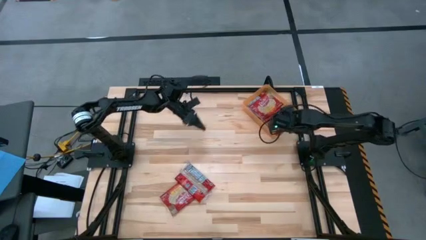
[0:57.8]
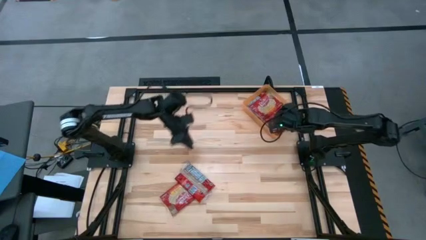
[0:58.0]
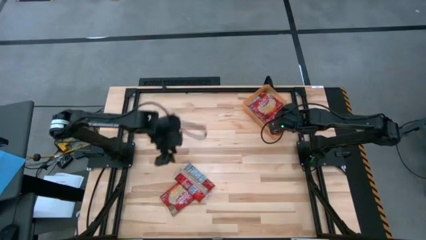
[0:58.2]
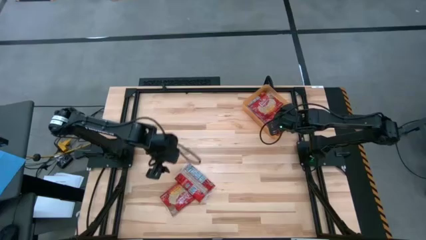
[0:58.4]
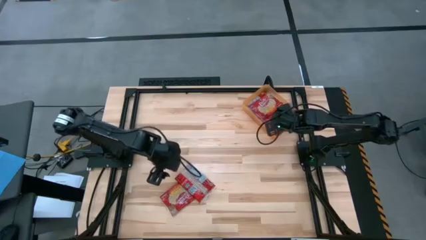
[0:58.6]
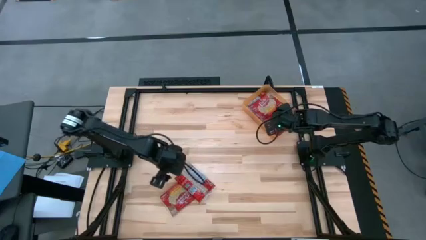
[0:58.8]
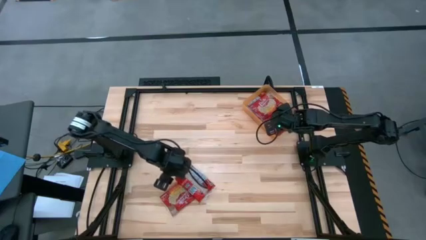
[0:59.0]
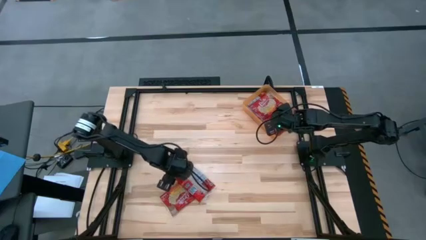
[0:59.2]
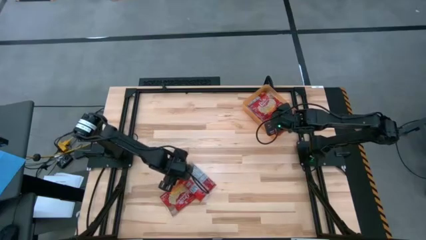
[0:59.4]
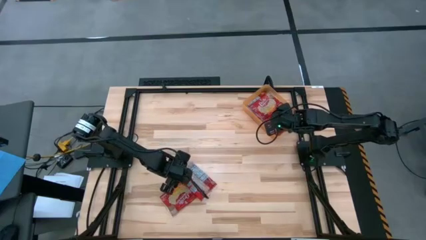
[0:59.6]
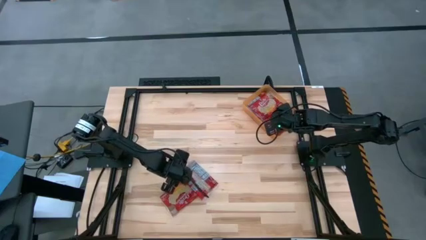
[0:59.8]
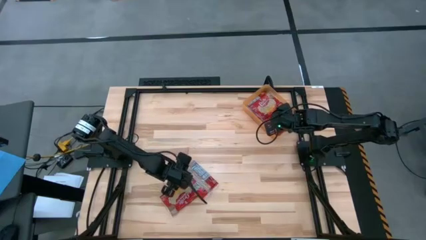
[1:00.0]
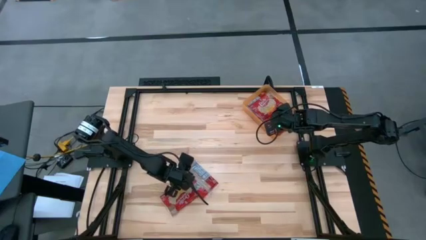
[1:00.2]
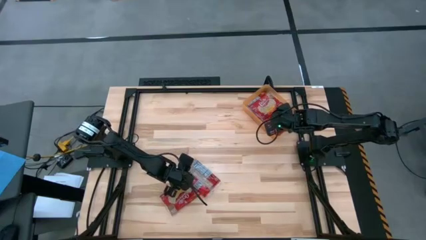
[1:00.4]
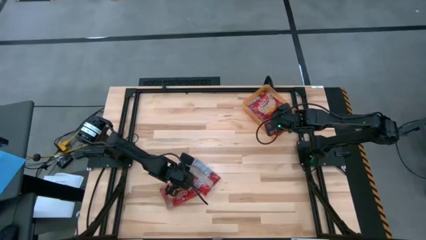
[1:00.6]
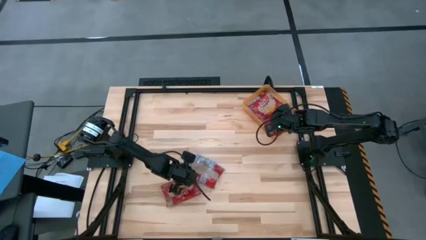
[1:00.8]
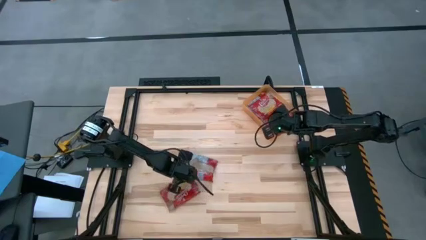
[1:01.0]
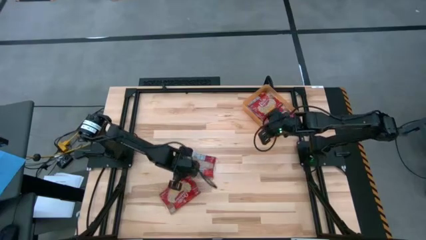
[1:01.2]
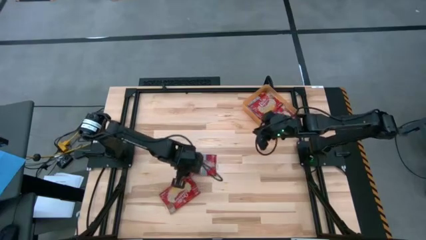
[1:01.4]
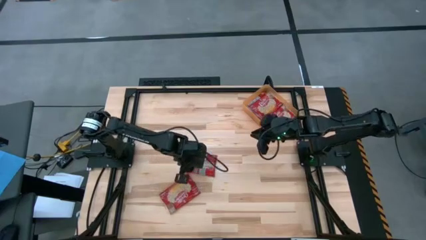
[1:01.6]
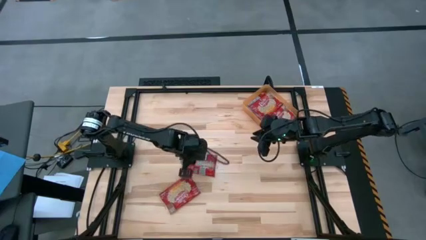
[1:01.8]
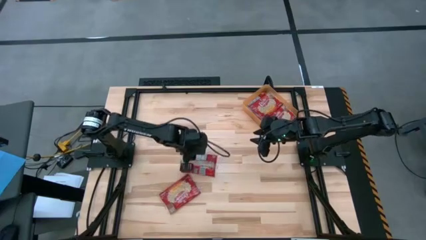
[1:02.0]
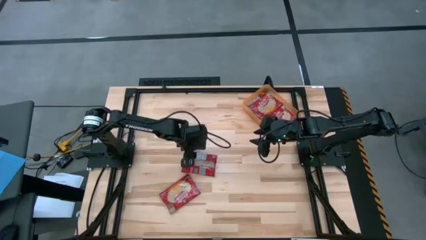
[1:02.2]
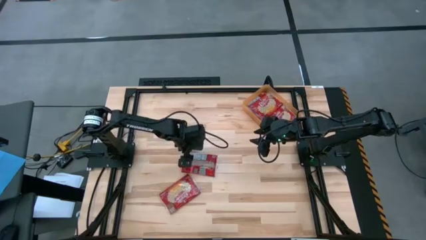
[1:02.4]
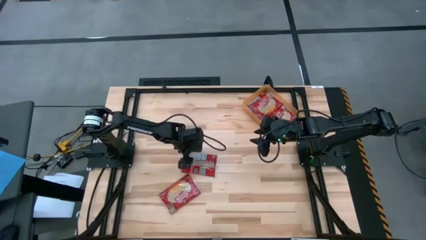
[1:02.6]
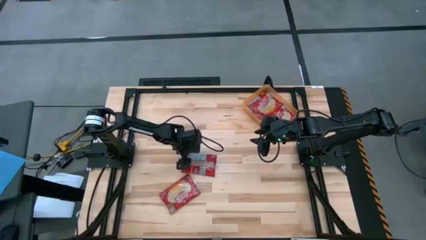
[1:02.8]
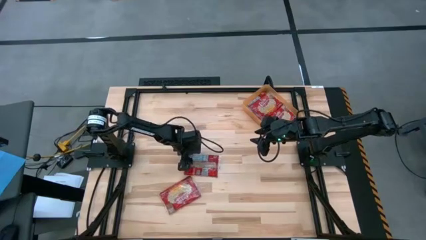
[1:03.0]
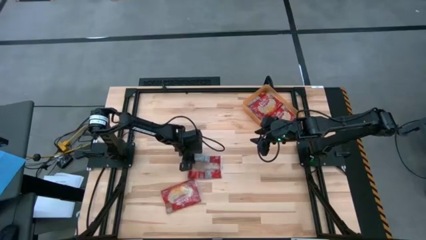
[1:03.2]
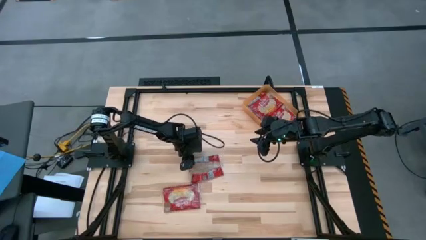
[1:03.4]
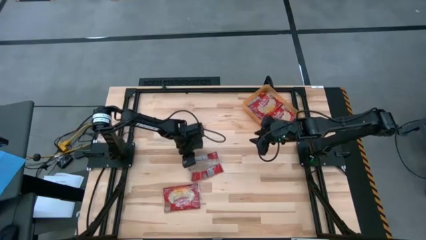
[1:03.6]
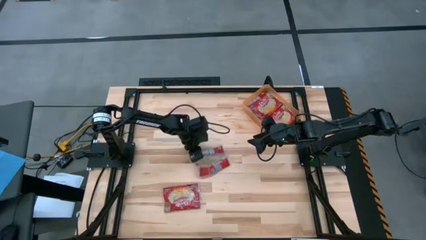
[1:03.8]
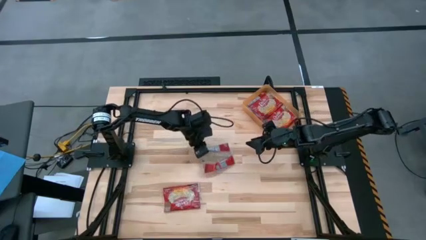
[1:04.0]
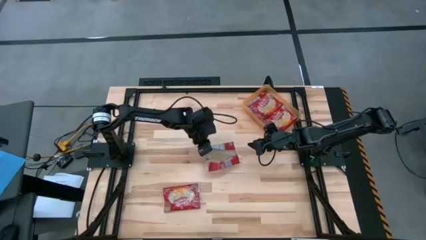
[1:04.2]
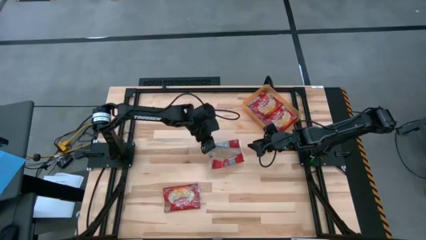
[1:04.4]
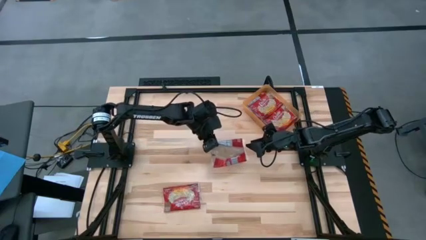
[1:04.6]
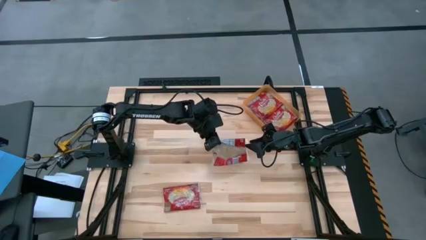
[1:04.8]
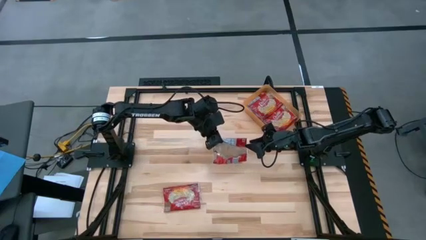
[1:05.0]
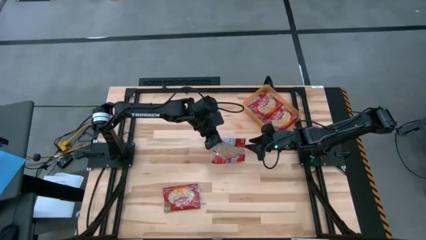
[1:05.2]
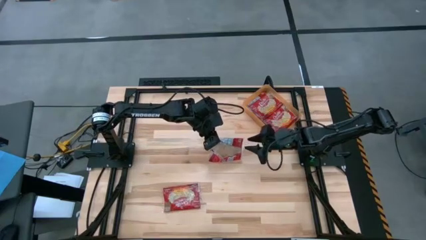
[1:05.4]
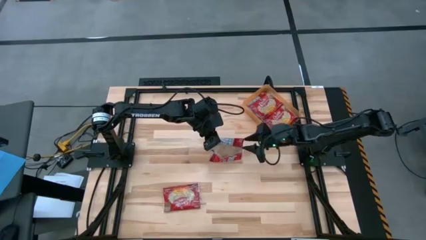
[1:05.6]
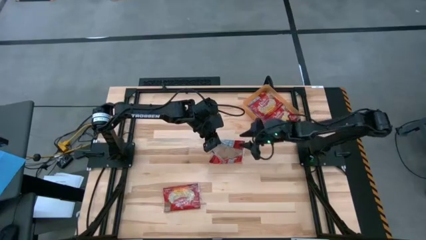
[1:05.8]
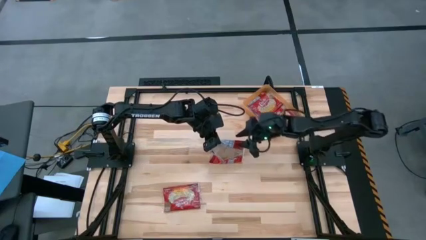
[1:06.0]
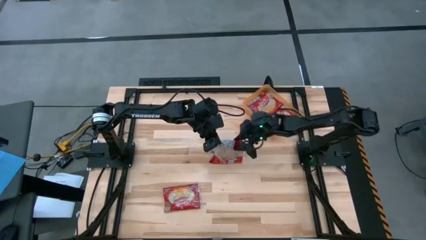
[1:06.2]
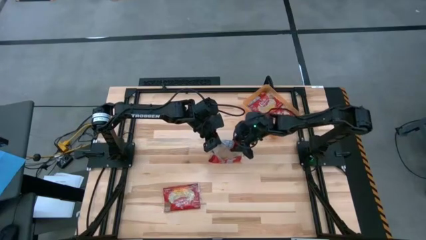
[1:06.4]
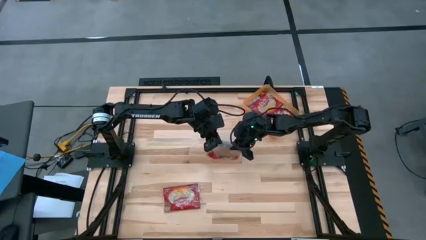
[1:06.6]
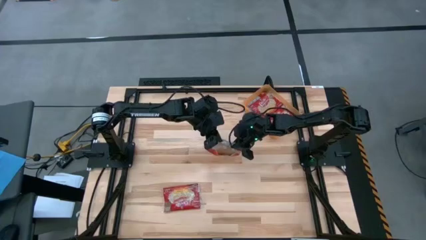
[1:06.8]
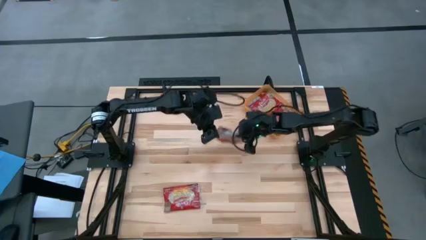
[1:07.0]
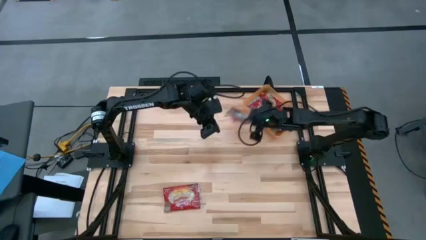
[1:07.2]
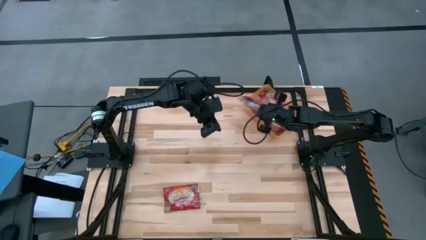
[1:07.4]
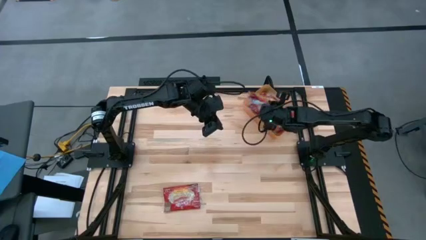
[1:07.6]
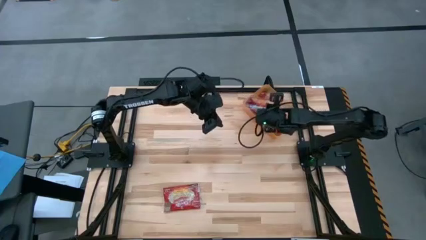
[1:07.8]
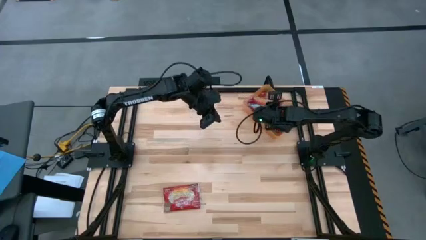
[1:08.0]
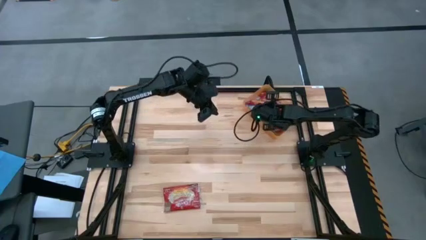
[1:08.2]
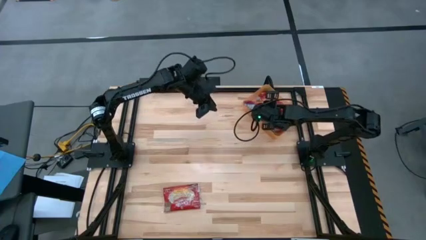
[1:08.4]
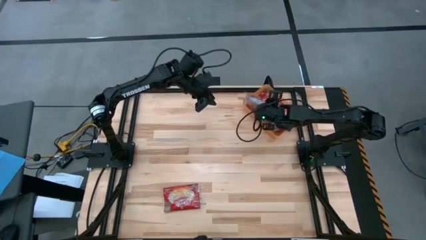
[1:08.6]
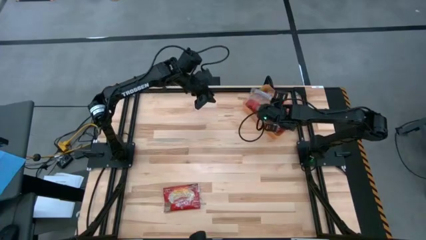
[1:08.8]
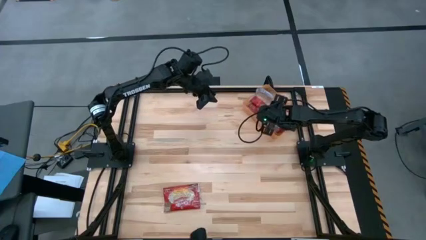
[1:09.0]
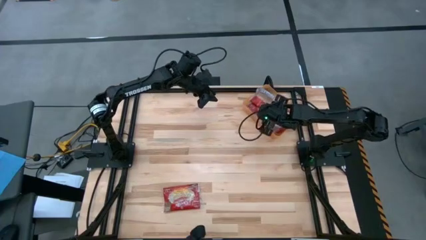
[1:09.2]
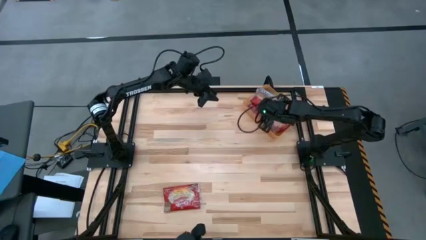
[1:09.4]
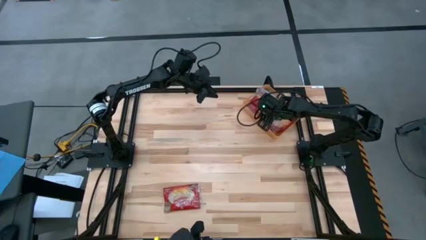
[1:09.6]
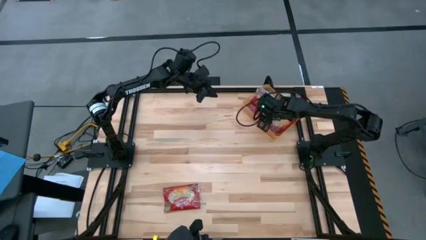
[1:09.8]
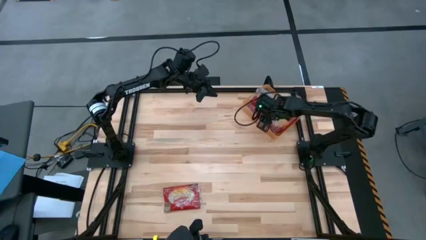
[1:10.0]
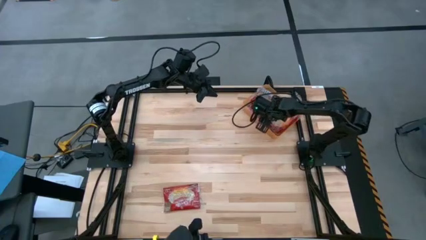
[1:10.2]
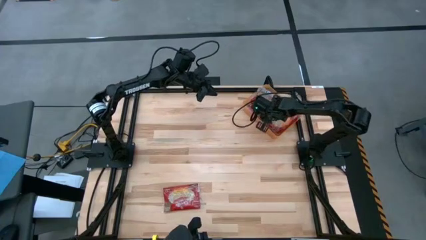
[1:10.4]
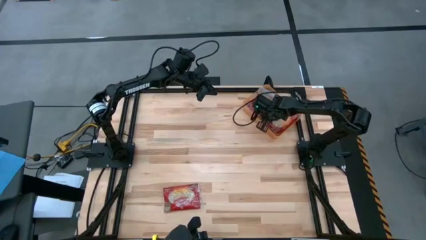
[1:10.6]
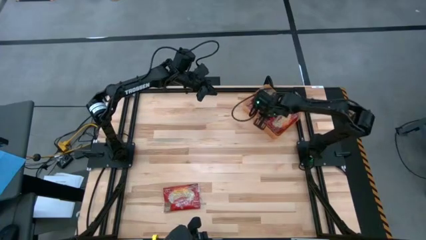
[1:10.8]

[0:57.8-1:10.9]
Task: Sort popcorn bags into baskets
Put the red popcorn bag into the orange bin

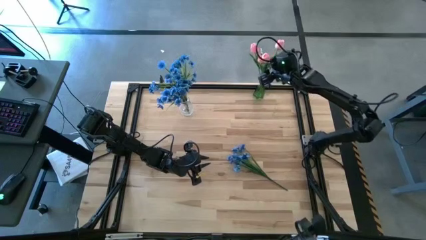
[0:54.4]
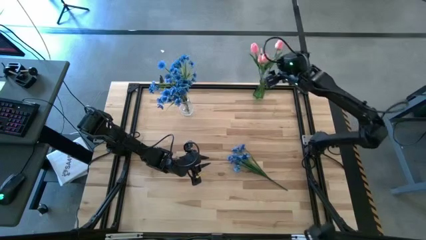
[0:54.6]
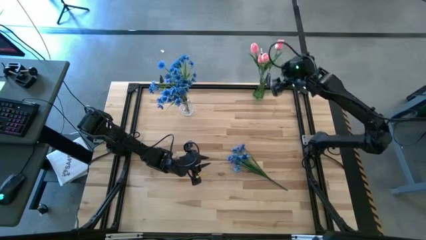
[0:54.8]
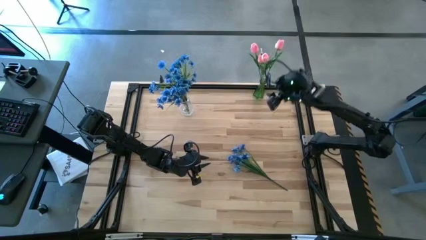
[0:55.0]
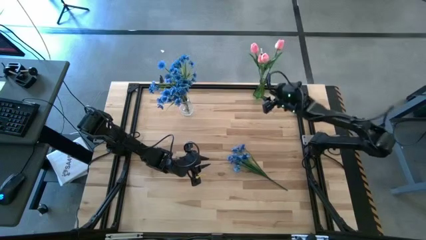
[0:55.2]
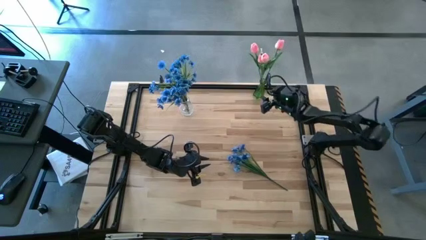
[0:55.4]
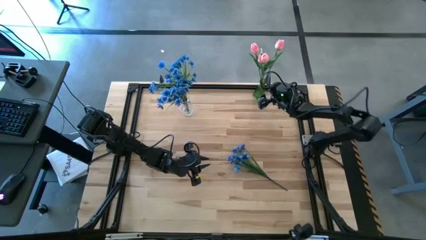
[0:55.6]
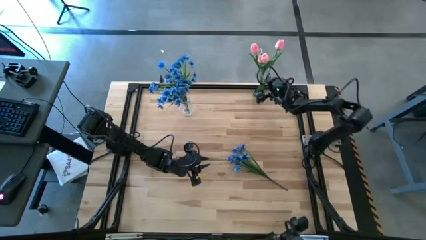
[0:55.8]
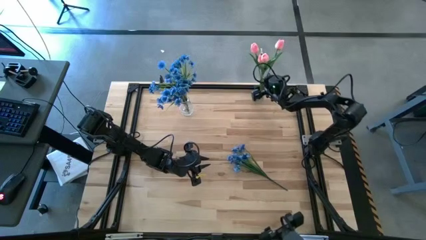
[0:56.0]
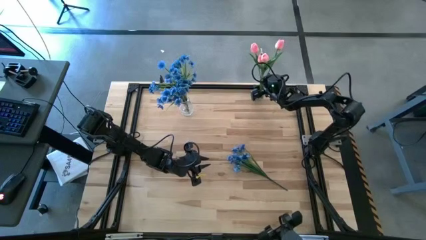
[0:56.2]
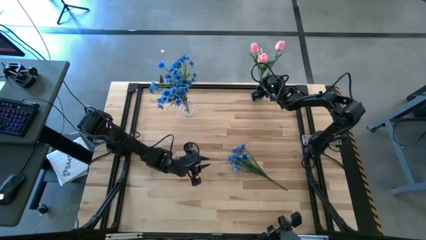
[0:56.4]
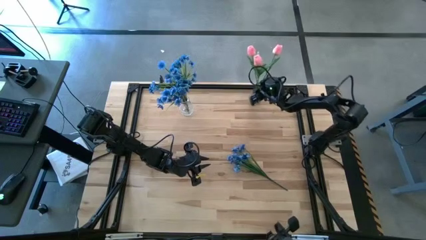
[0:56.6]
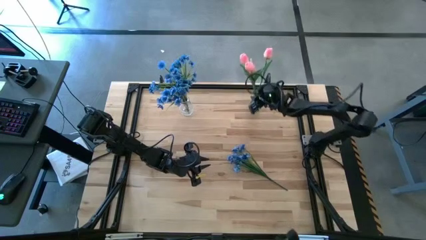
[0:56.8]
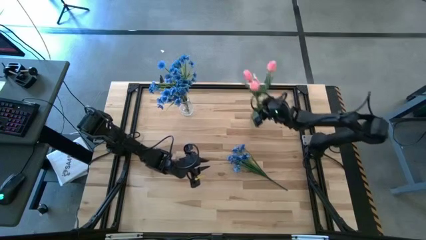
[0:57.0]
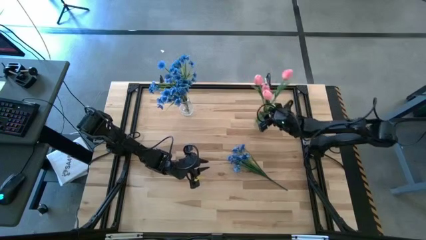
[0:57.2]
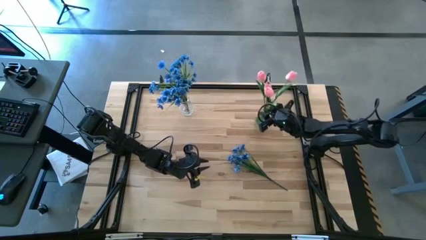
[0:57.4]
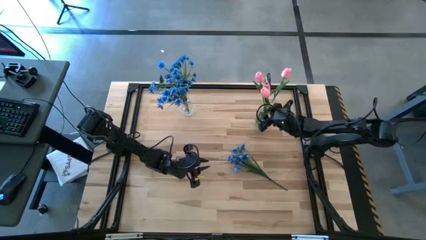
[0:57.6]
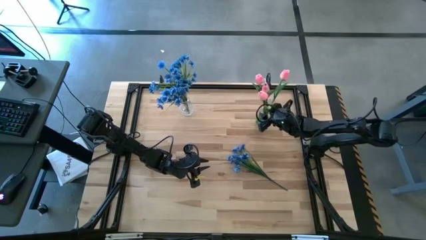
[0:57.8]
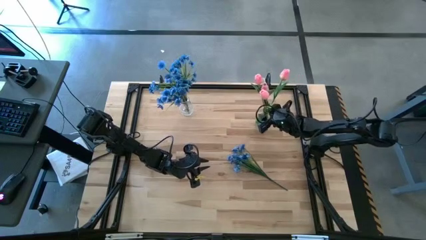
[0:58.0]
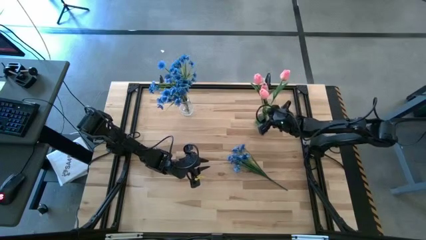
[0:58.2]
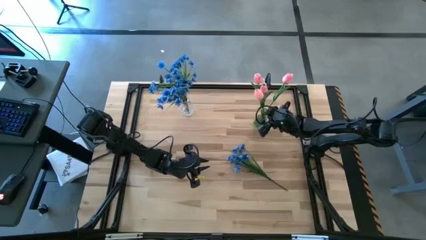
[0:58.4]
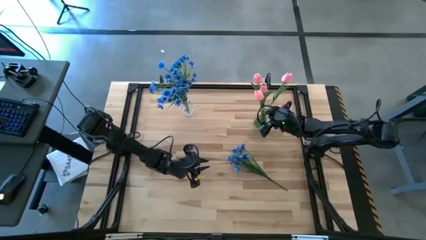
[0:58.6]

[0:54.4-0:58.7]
Task: Sort flowers into vase by color
Move the green vase to the middle right of the table
